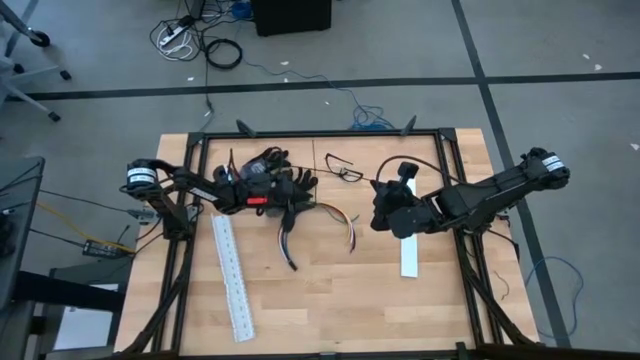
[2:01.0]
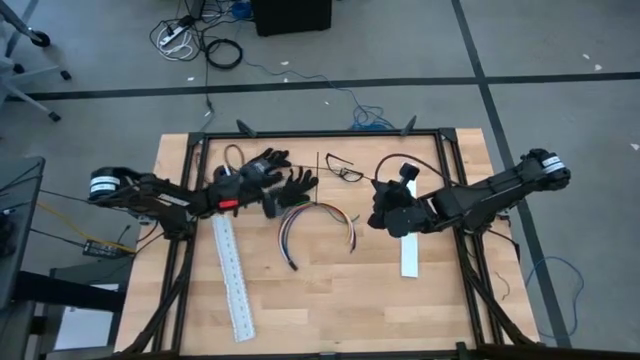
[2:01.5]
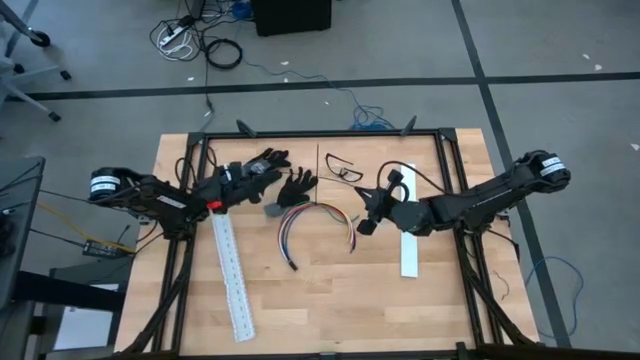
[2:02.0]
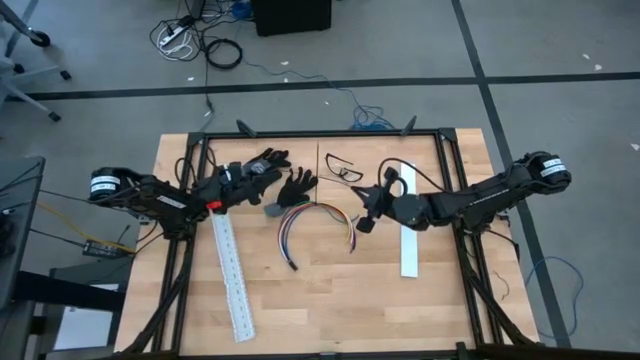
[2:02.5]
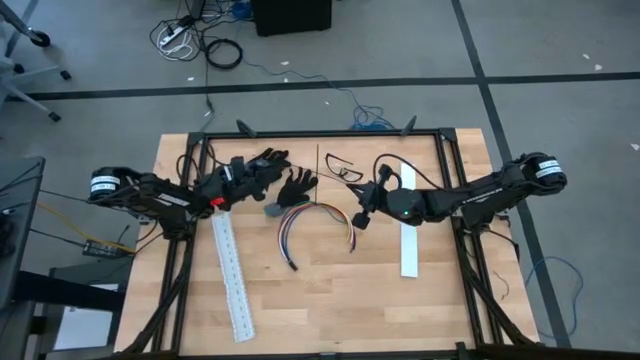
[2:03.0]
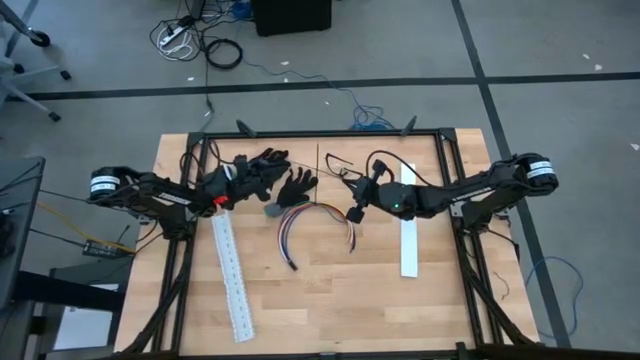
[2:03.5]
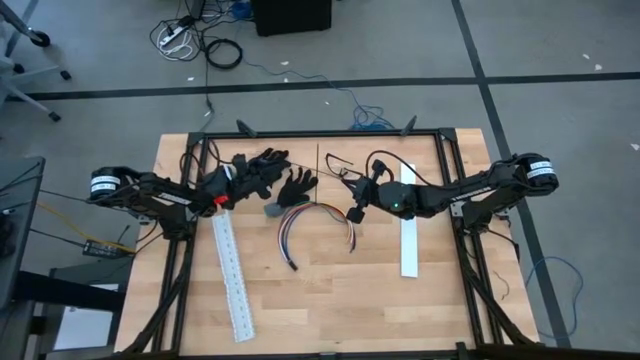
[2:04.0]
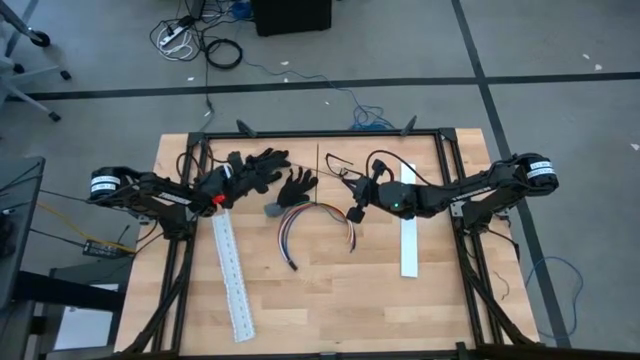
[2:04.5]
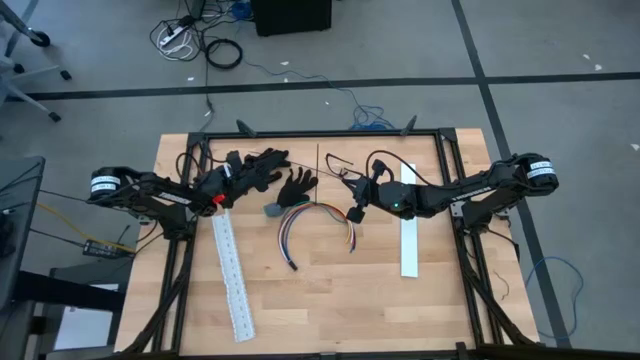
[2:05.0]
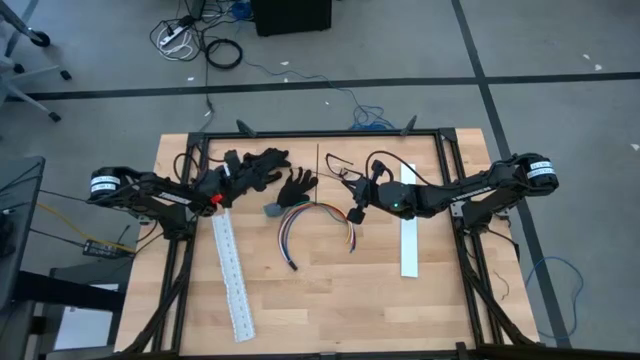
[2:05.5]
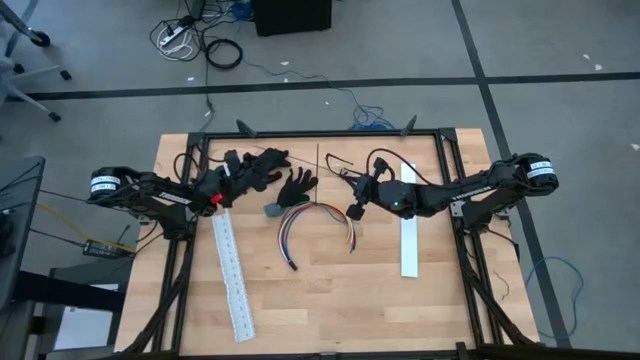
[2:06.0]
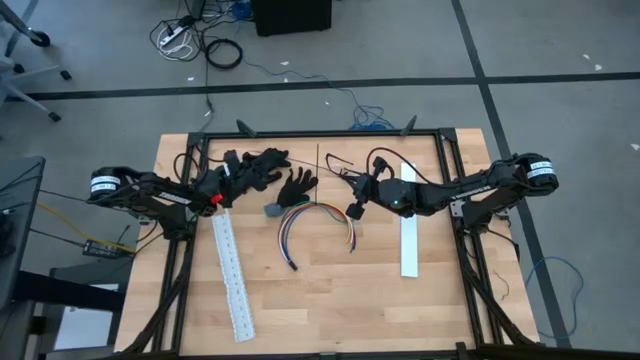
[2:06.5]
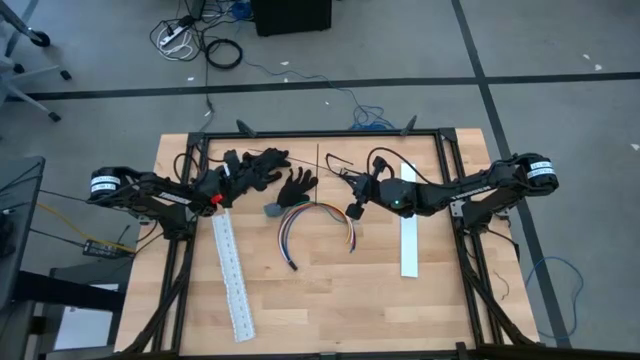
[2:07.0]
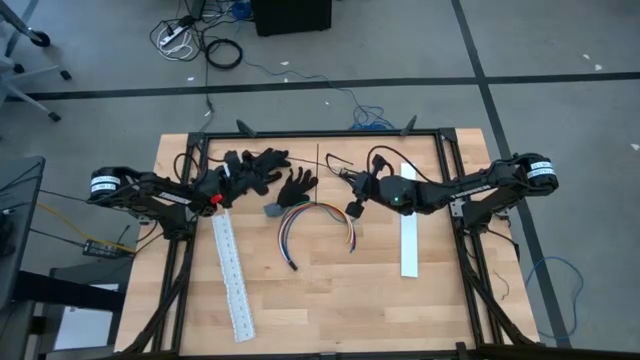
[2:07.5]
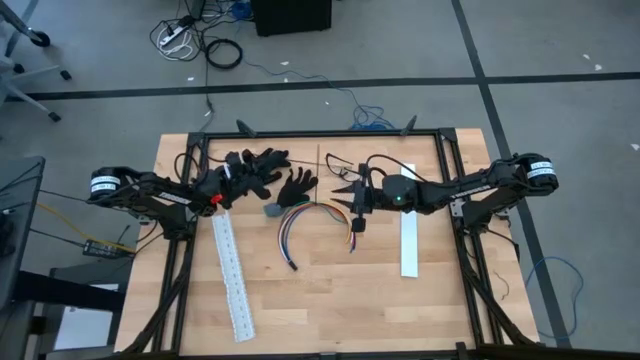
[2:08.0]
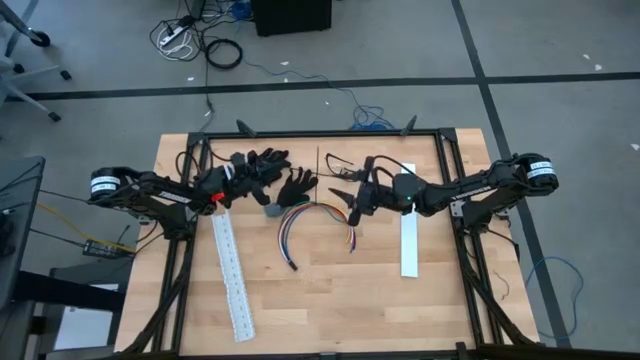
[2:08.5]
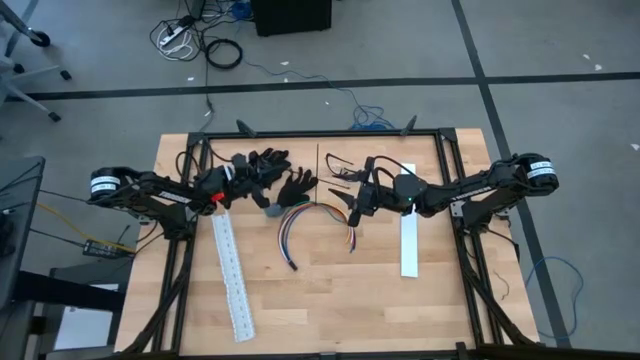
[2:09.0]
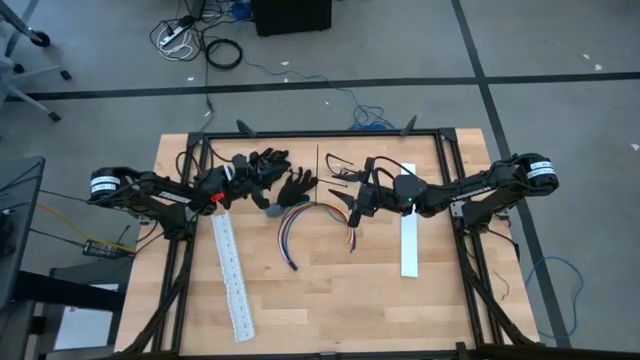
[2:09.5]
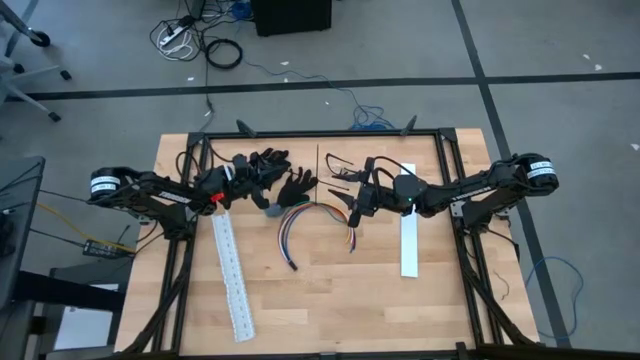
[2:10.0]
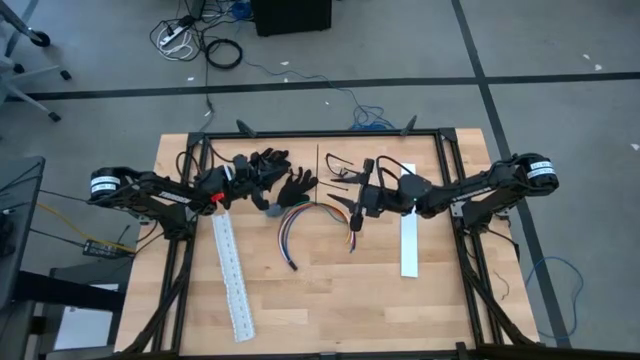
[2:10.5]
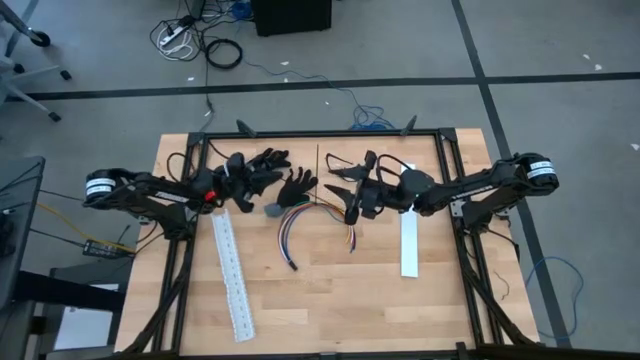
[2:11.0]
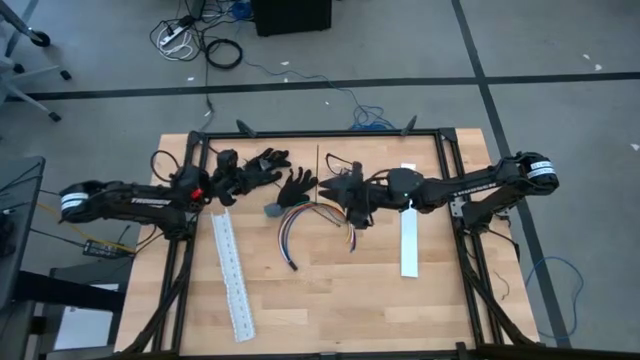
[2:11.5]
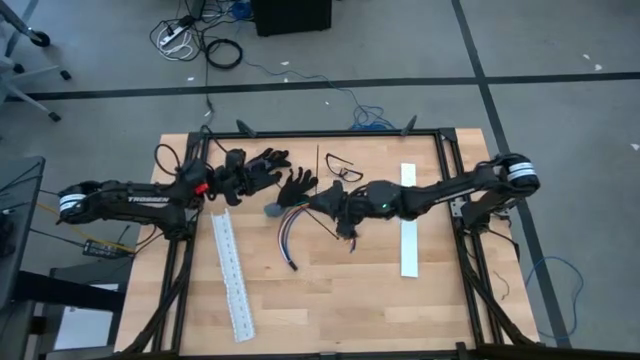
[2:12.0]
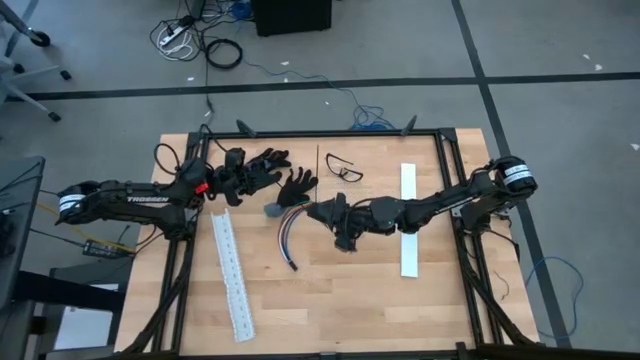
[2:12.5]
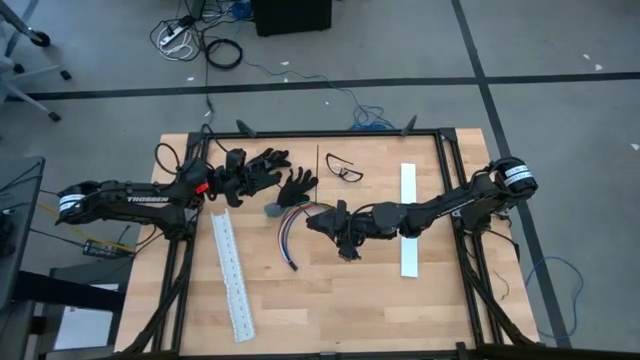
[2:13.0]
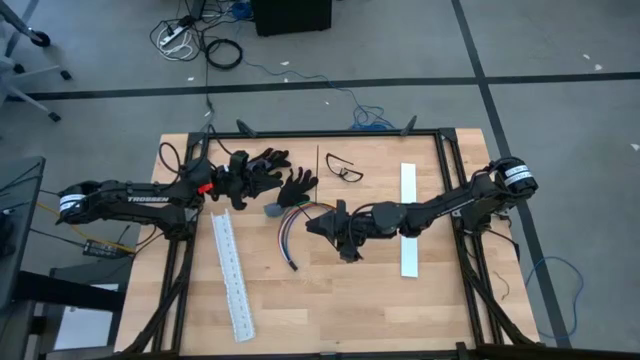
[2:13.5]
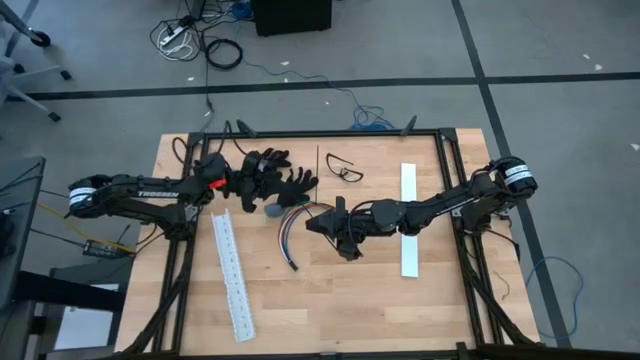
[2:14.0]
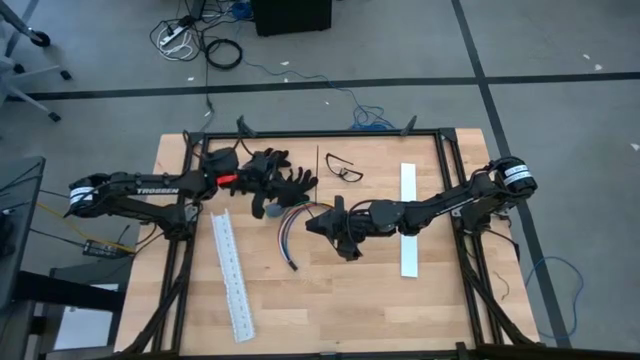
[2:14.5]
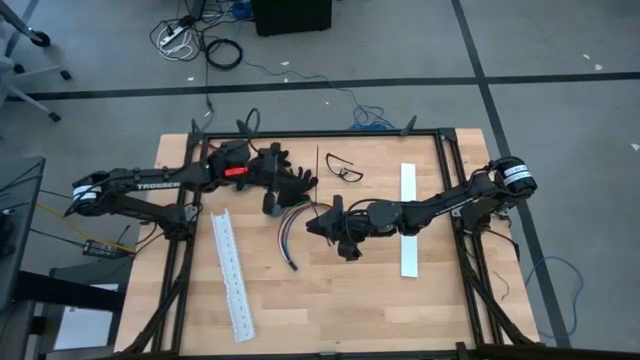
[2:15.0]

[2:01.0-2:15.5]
Task: Ziptie cables
Insert the black zip tie pointed tail end through the slot to form a loop

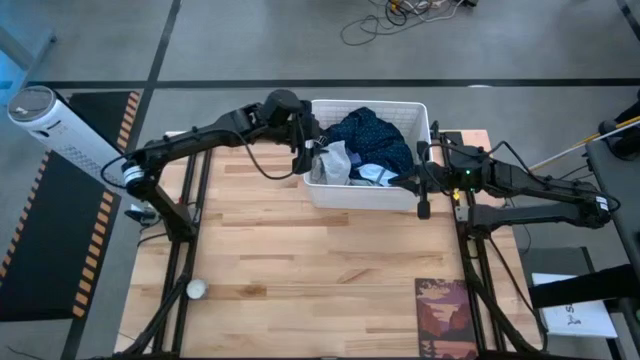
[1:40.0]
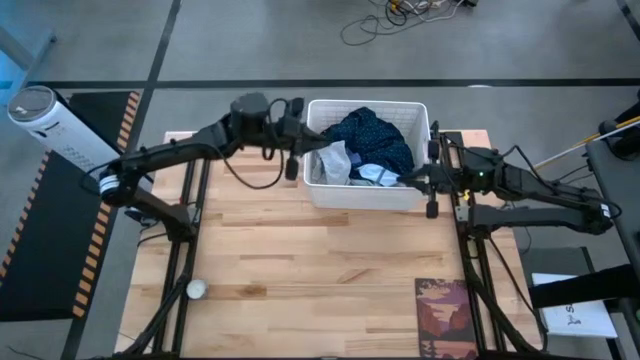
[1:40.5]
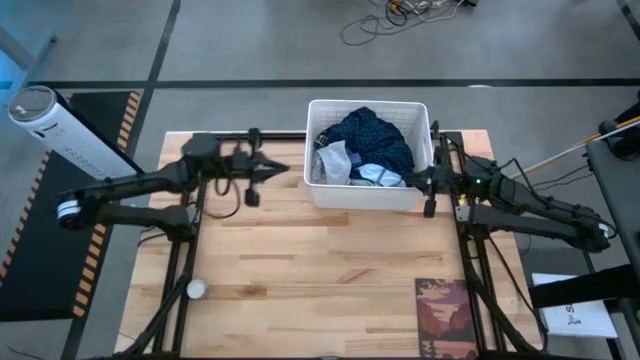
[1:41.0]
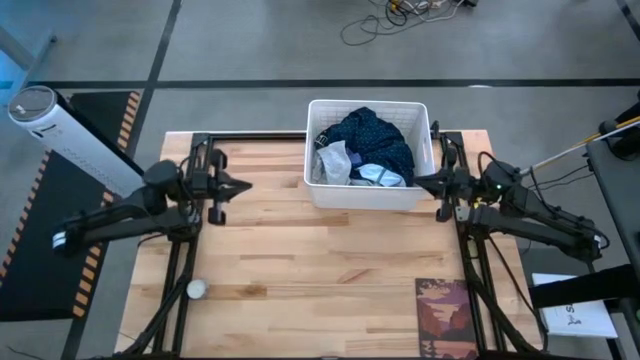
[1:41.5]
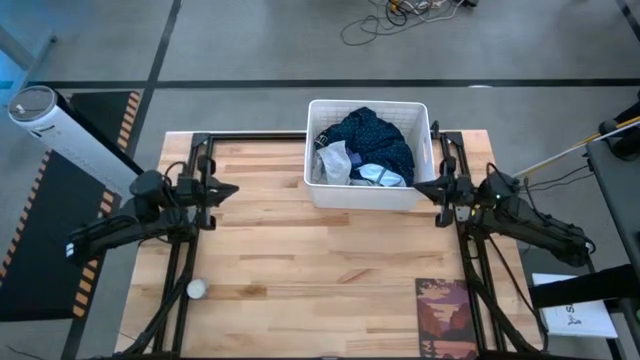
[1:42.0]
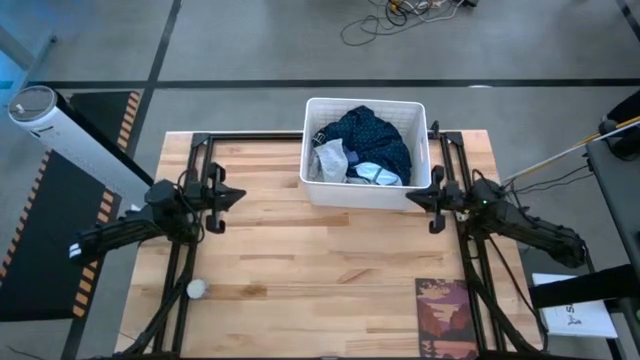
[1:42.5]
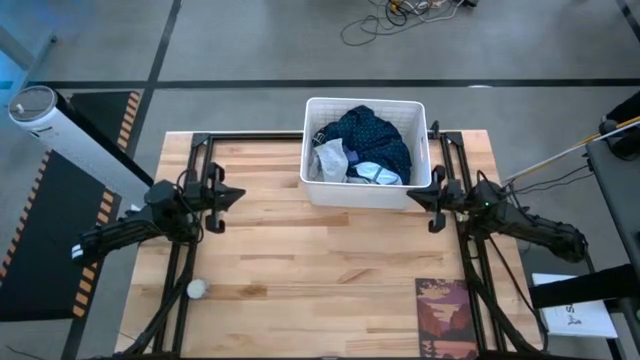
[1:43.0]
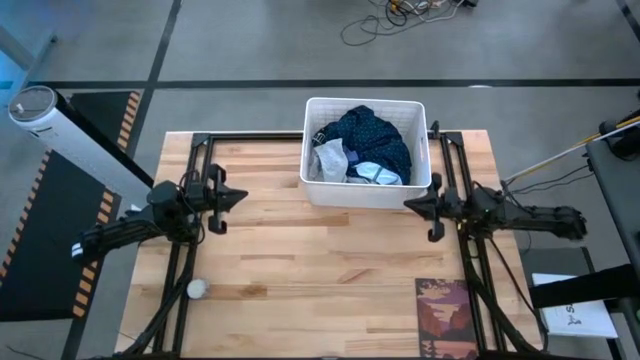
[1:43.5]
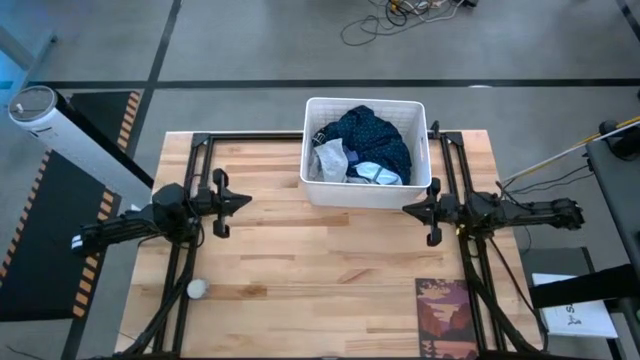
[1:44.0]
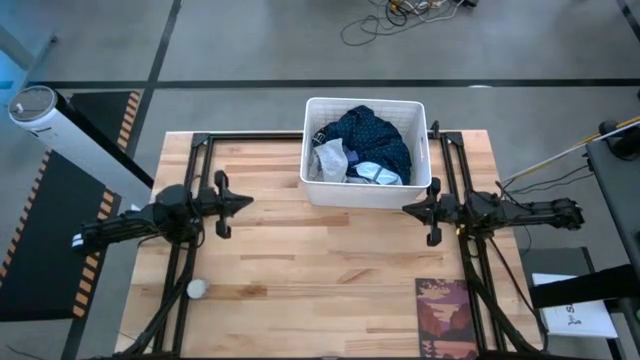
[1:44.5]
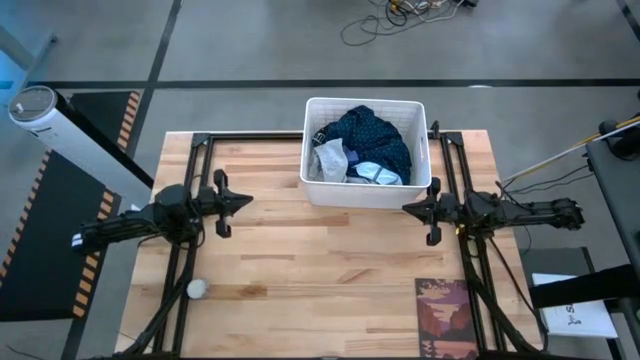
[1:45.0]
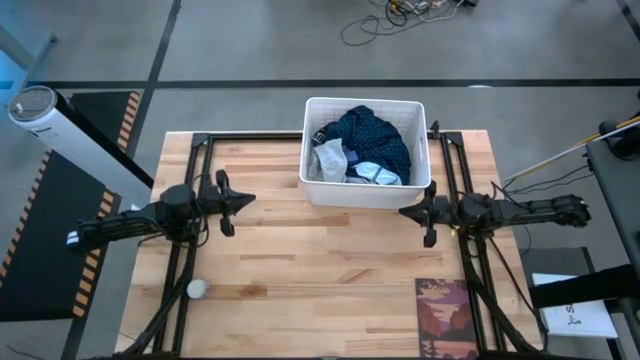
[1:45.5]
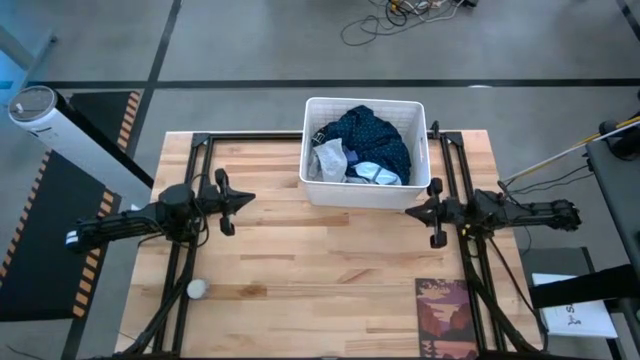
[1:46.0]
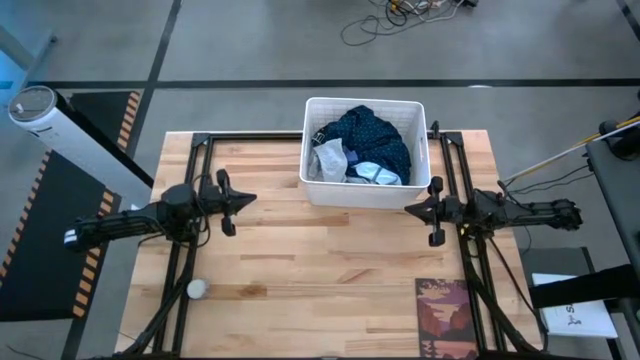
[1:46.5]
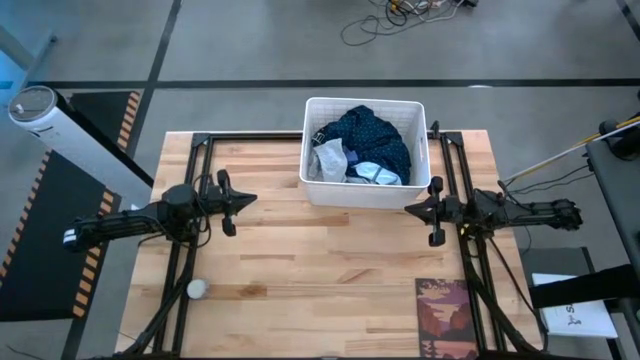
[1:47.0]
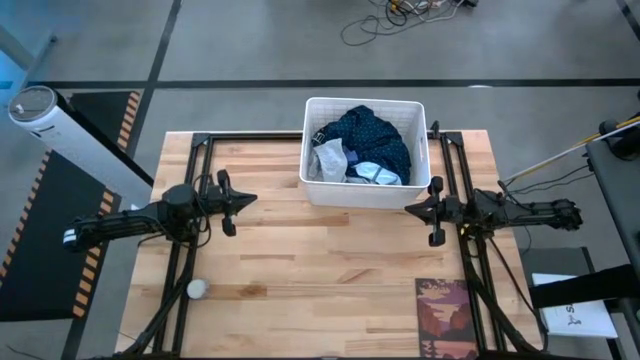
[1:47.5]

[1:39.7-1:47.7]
Task: Sort clothes
Return to Home Position
